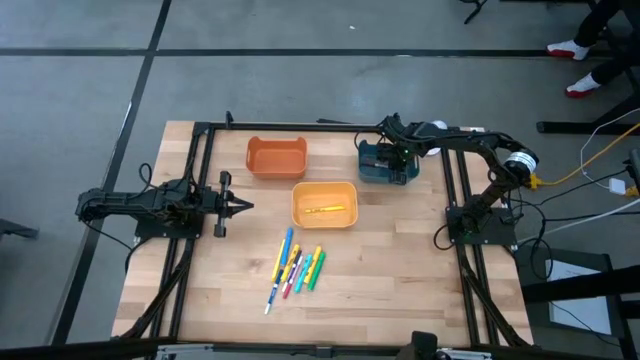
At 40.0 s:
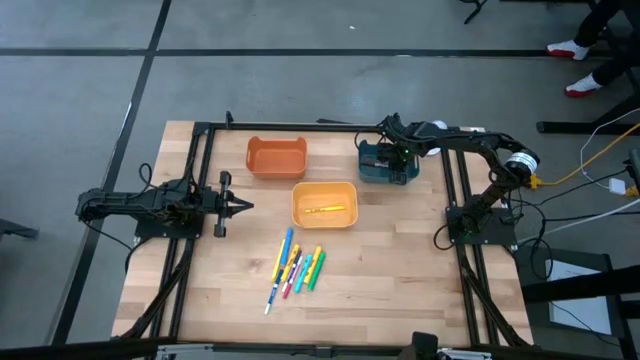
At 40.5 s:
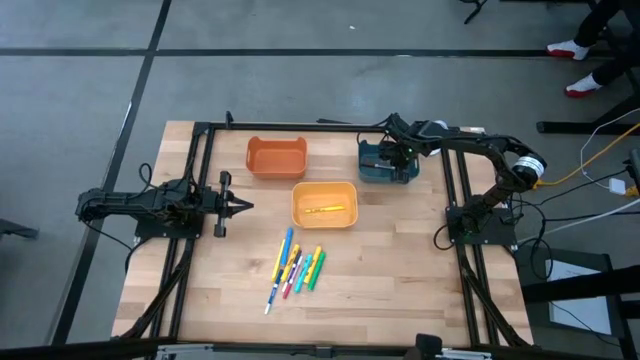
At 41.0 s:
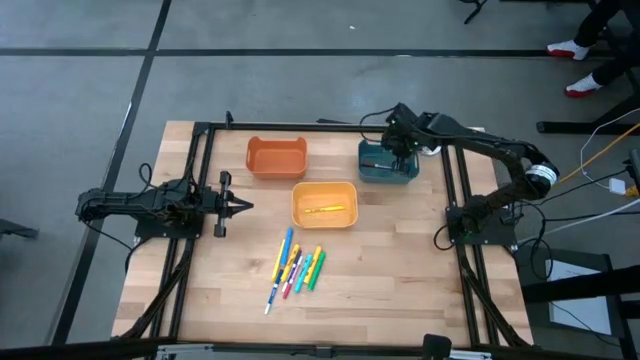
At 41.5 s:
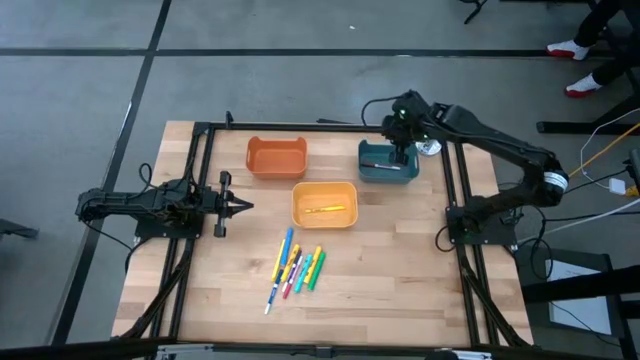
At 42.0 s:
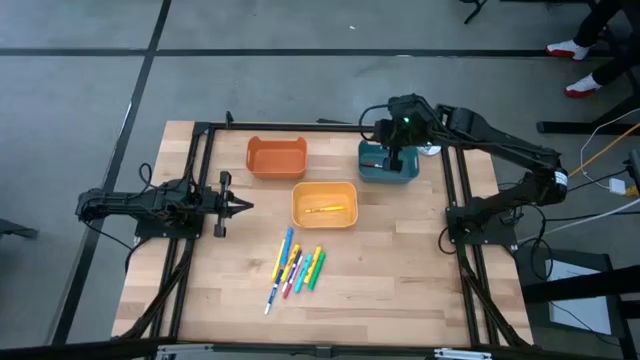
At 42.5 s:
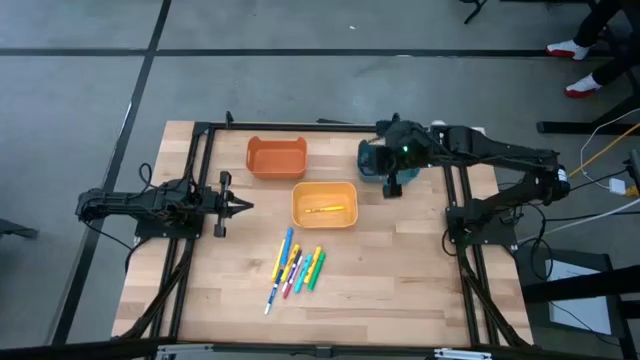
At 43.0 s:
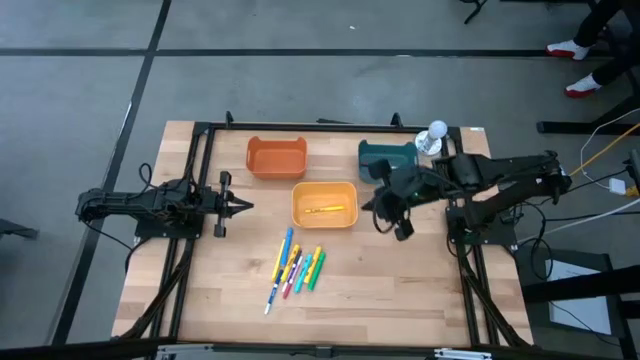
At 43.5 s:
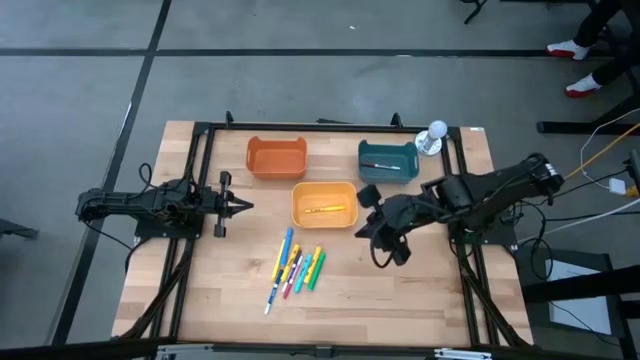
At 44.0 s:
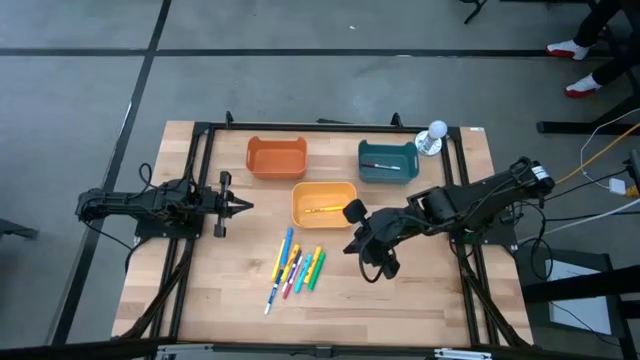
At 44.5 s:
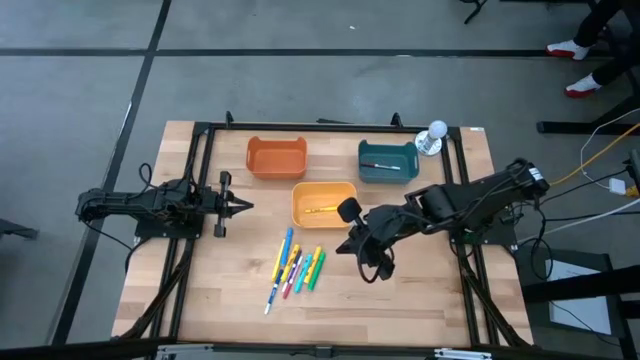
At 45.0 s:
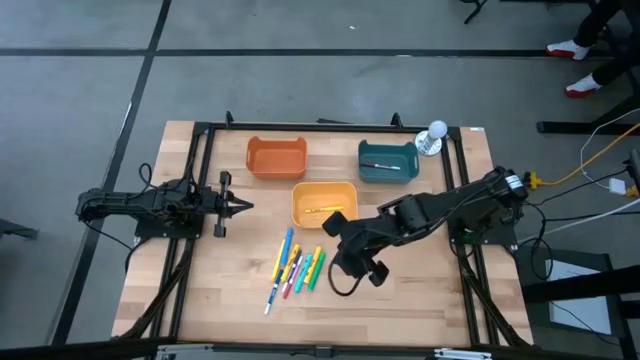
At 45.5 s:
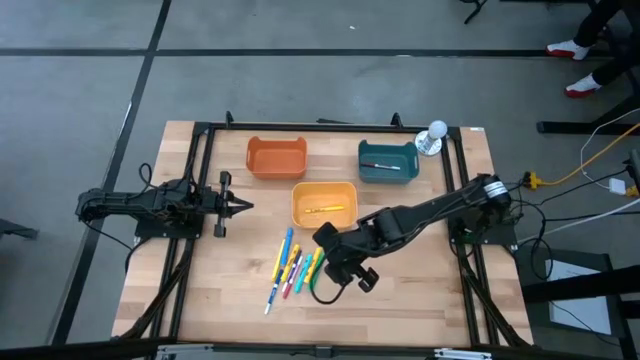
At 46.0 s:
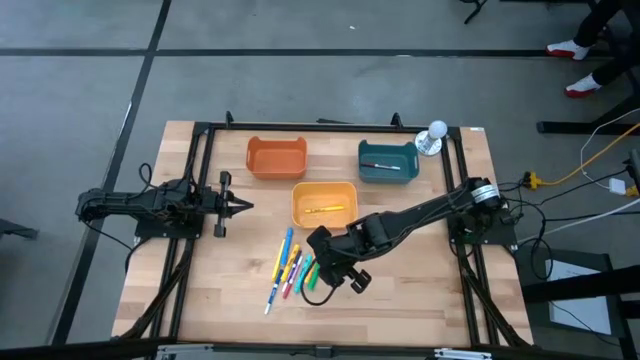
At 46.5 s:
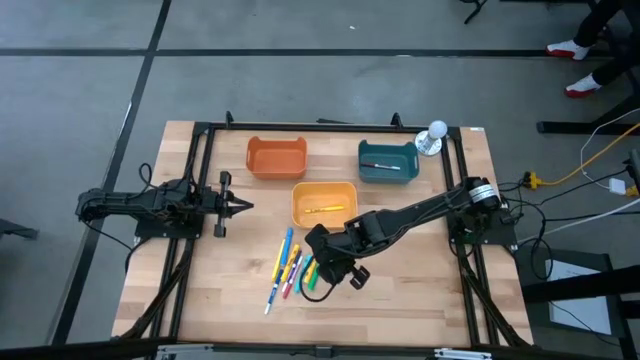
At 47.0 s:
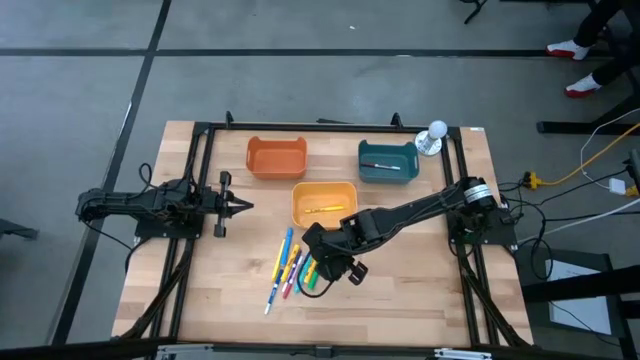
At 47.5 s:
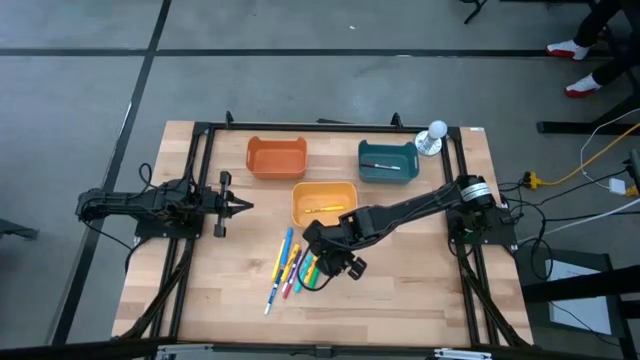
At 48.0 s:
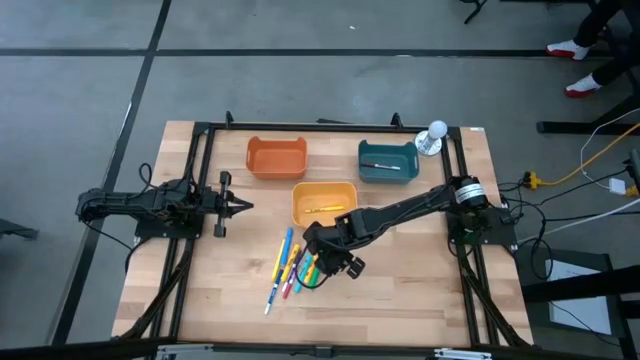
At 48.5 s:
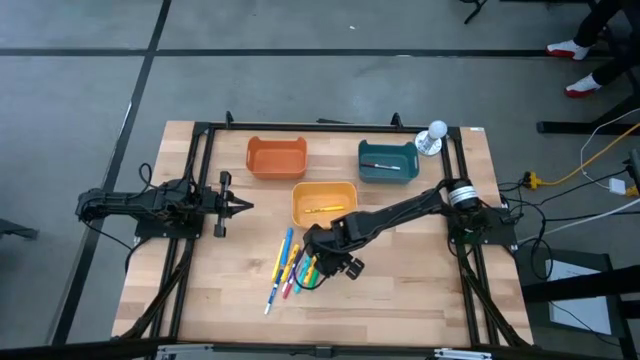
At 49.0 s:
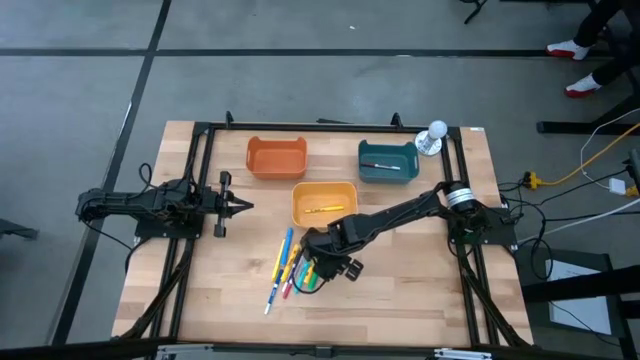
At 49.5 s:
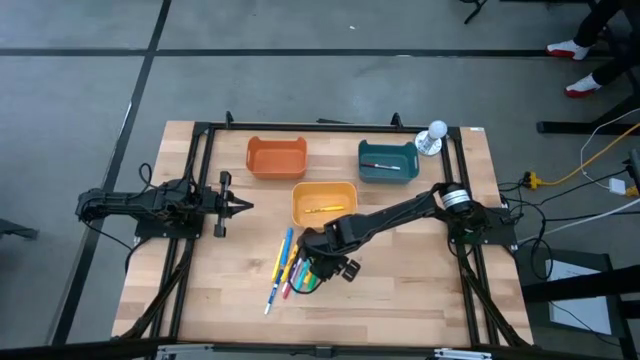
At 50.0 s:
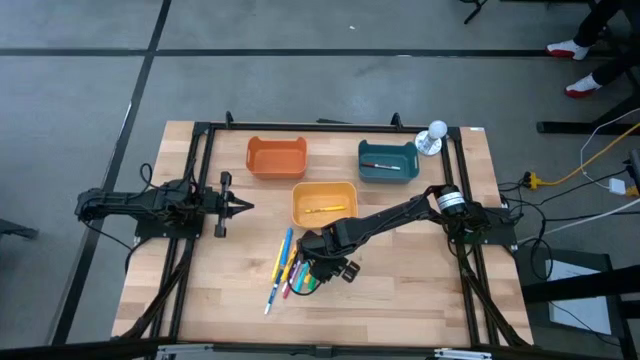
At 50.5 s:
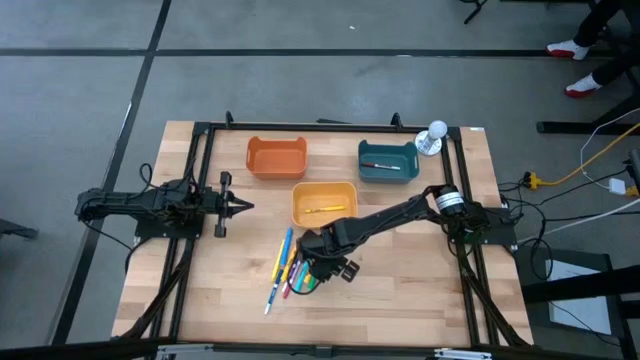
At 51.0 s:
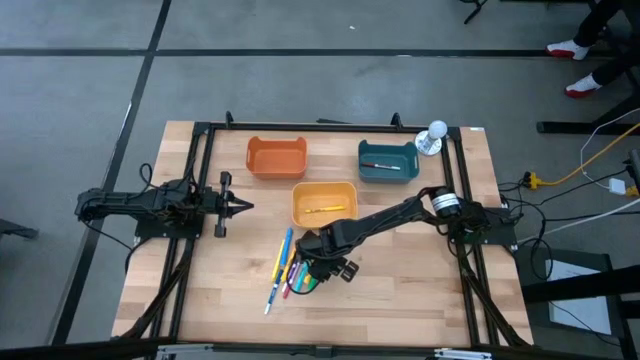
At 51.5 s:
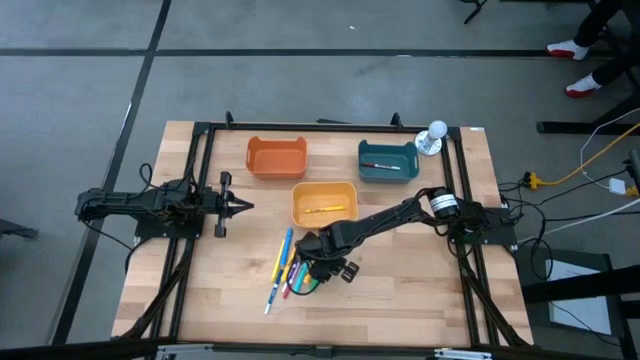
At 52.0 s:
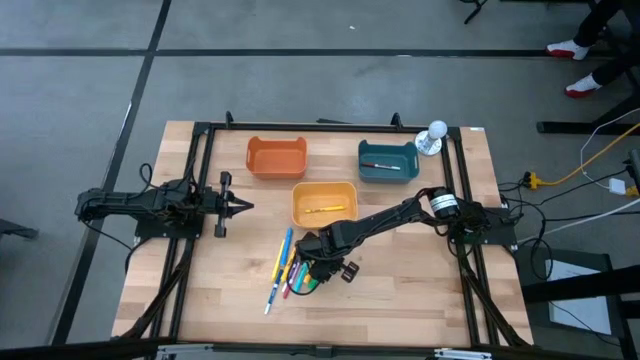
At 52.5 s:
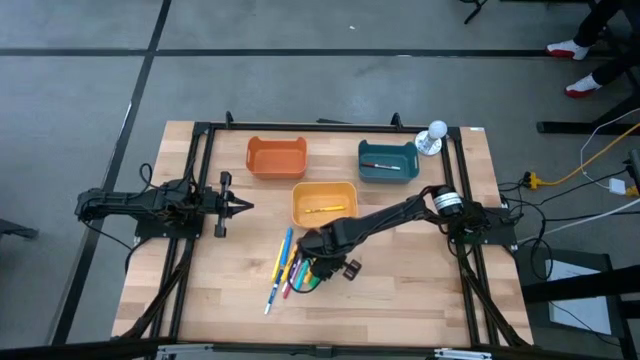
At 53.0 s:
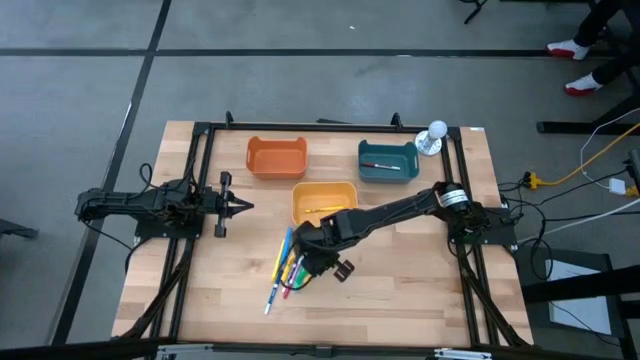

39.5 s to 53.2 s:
Task: Pick & Place Markers
Put the big green highlighter pen into the orange bin

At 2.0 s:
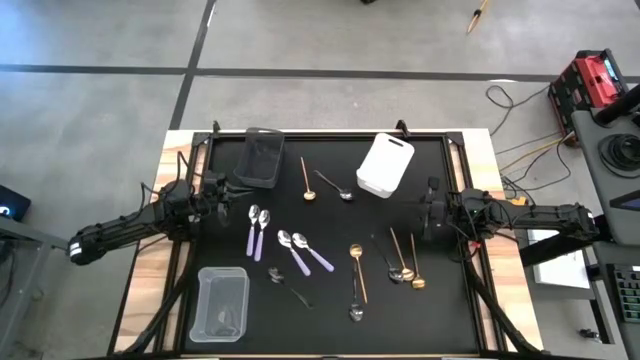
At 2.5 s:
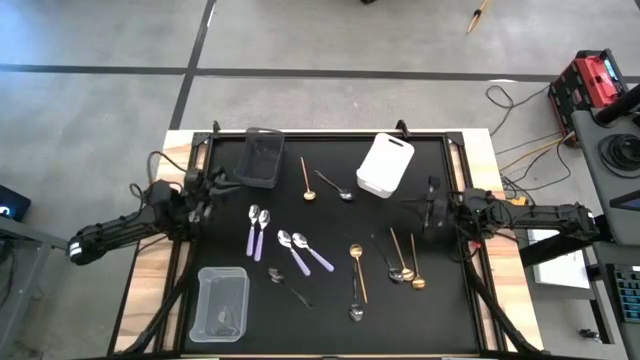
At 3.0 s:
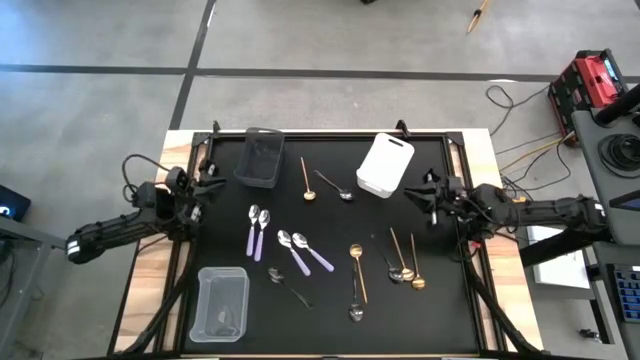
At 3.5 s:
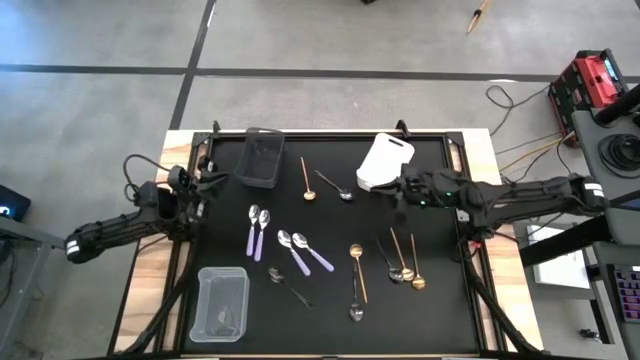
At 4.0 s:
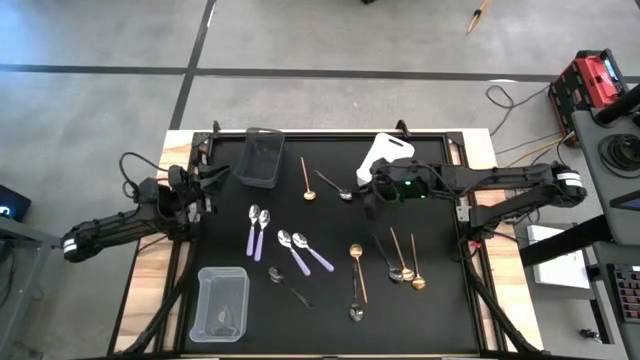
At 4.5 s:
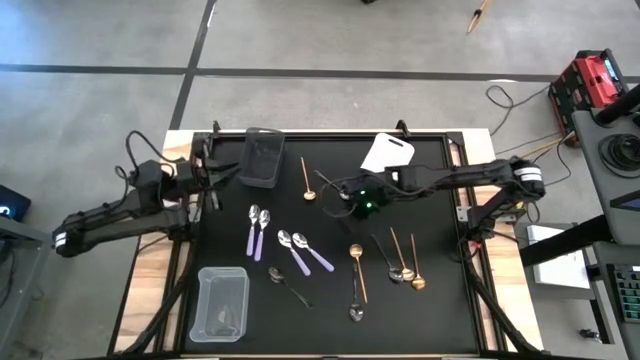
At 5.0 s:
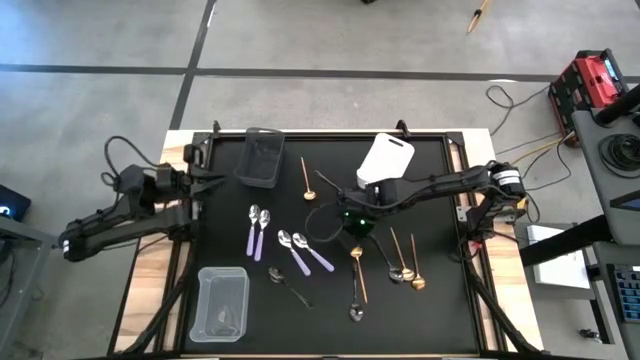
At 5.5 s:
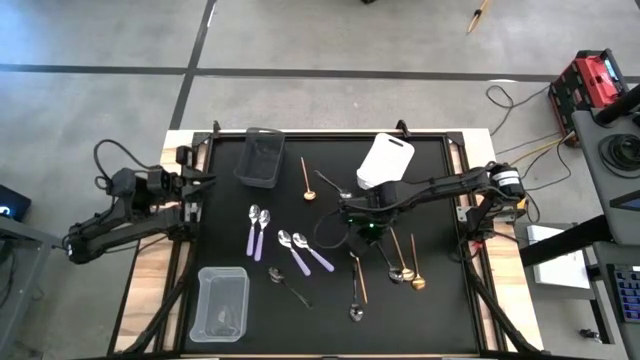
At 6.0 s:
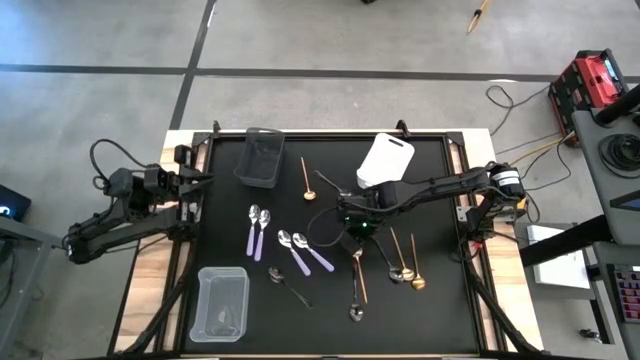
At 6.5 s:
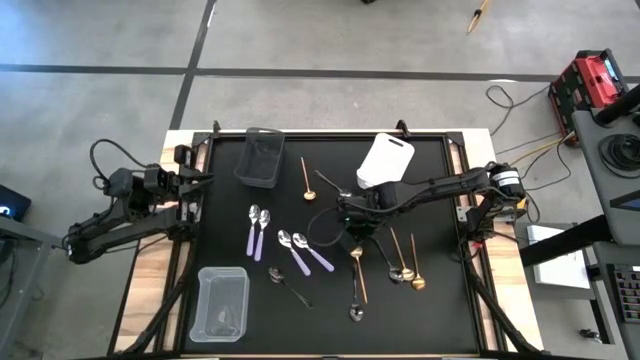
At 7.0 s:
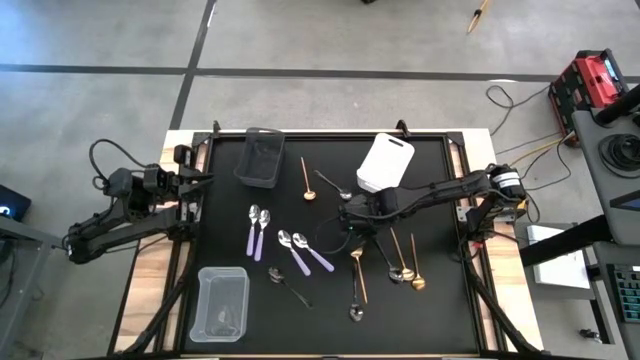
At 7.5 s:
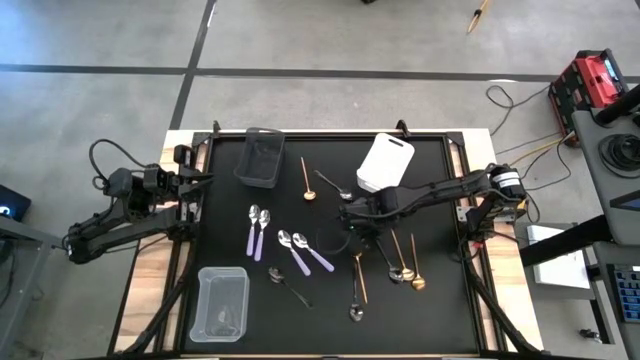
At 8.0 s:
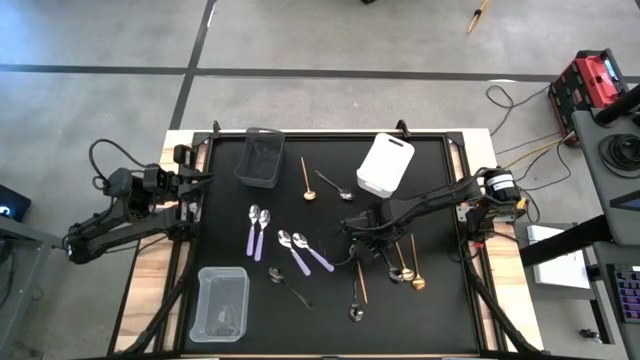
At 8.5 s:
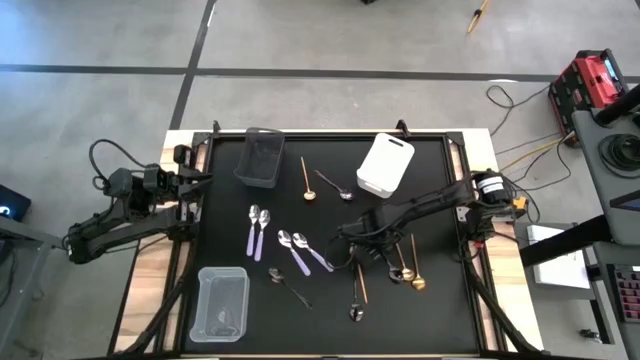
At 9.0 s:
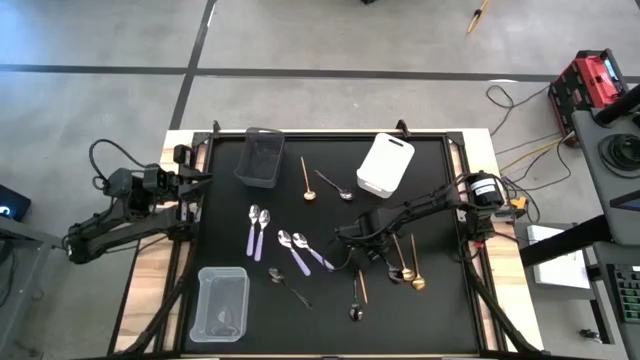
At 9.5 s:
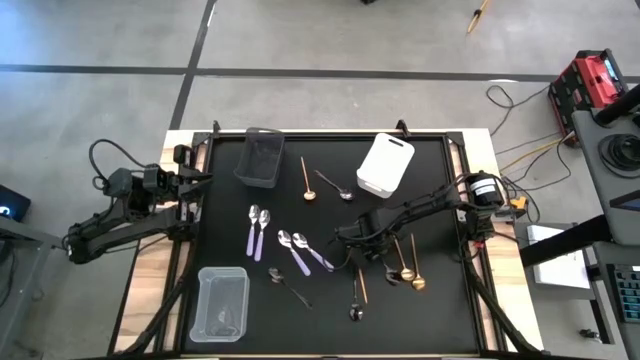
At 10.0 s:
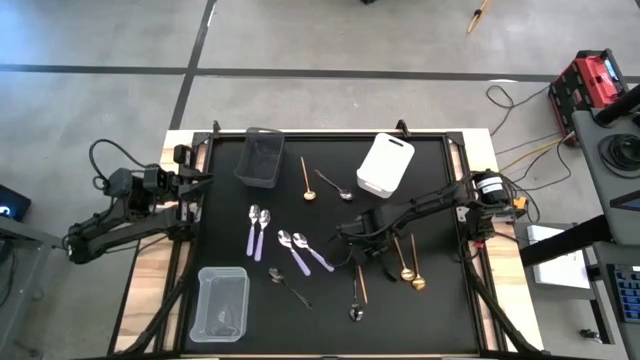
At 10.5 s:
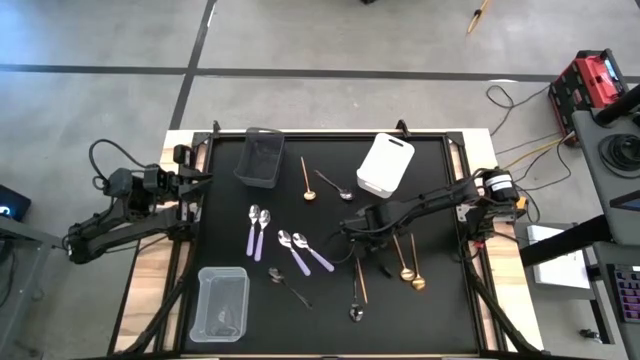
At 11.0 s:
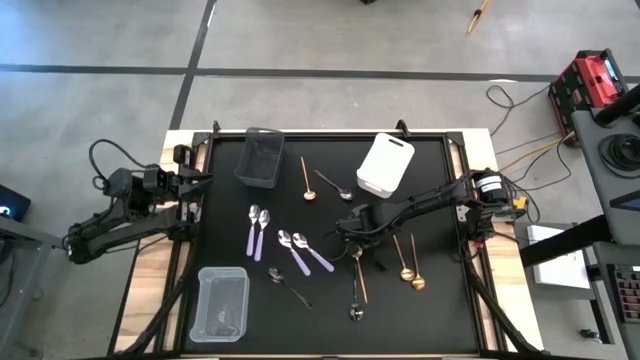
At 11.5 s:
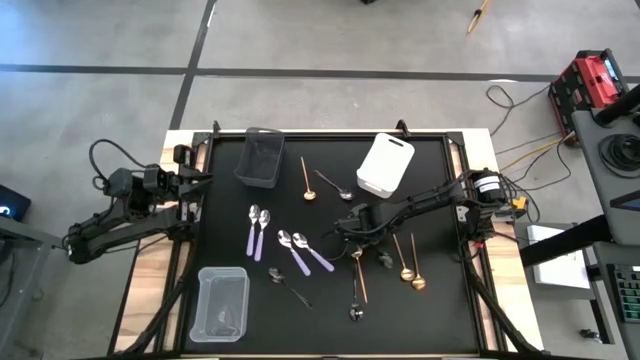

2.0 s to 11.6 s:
Task: Sort silverware by color (type)
Put the black spoon into the white bin
